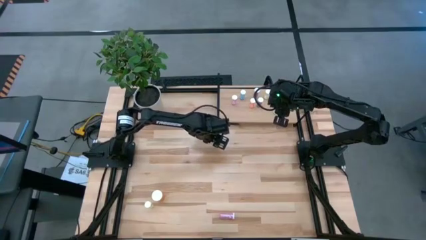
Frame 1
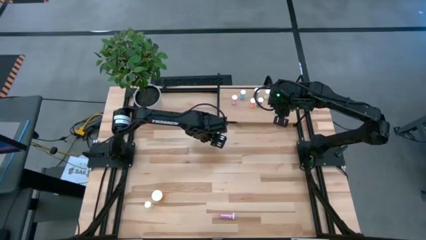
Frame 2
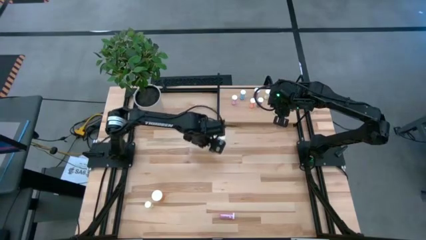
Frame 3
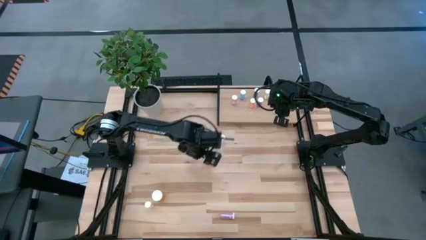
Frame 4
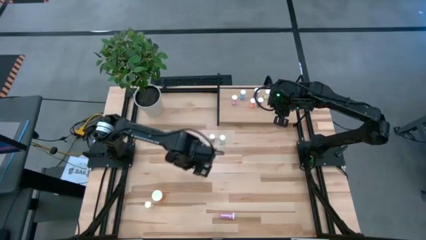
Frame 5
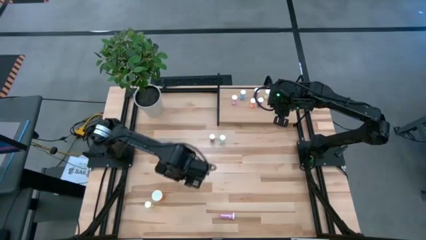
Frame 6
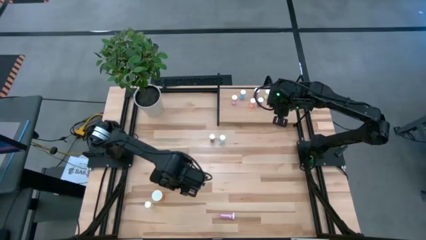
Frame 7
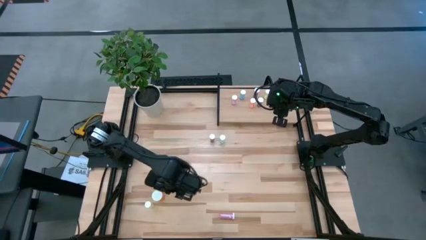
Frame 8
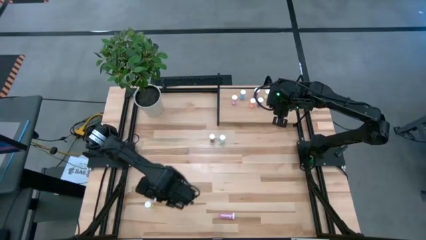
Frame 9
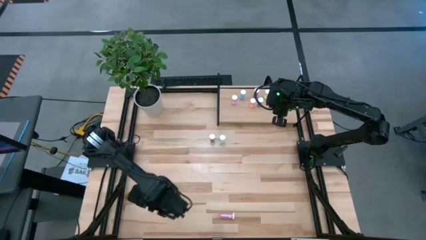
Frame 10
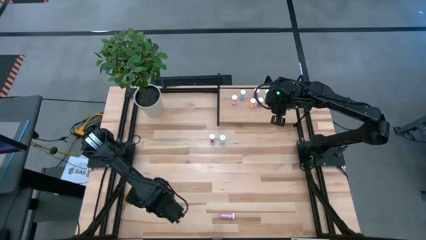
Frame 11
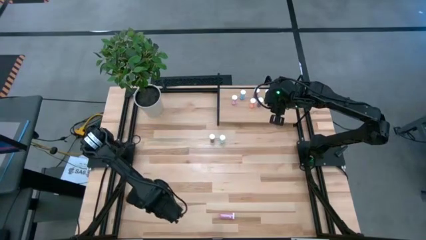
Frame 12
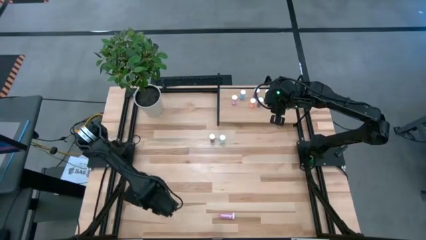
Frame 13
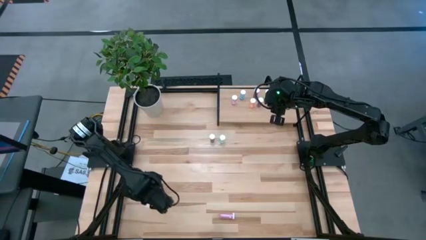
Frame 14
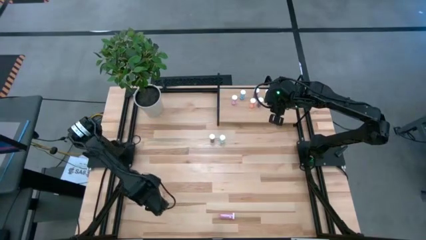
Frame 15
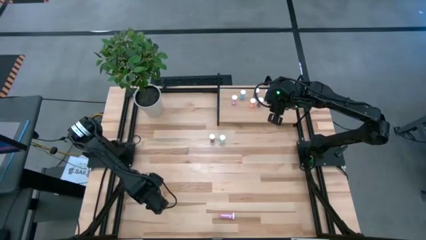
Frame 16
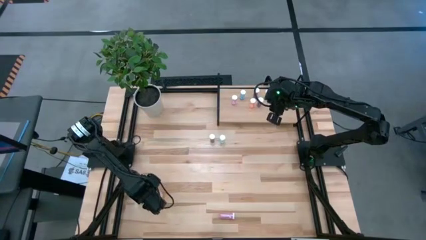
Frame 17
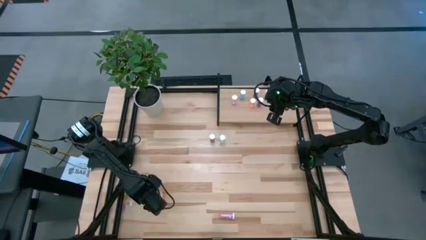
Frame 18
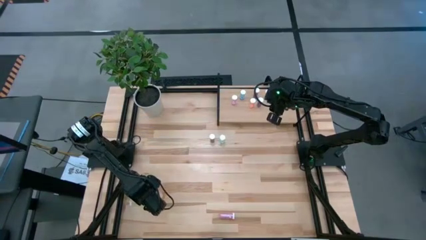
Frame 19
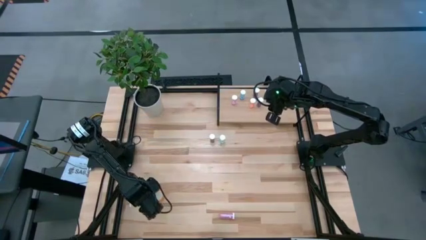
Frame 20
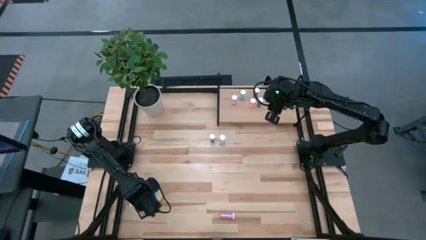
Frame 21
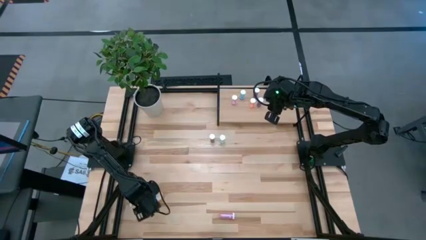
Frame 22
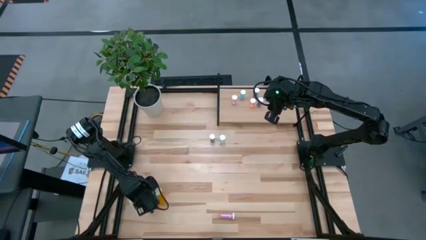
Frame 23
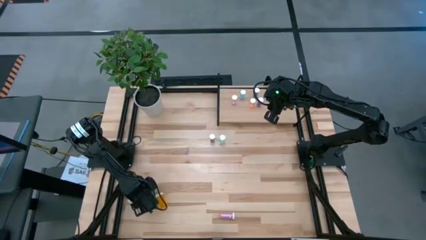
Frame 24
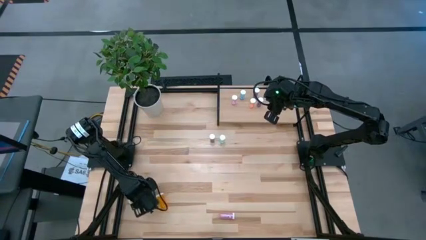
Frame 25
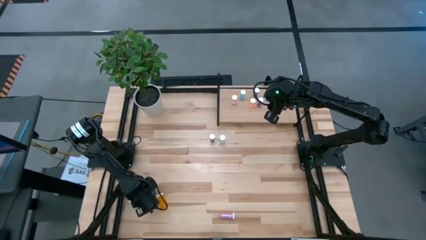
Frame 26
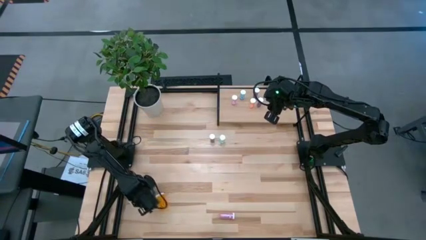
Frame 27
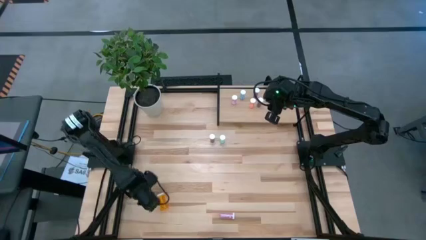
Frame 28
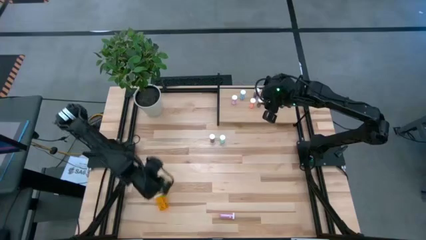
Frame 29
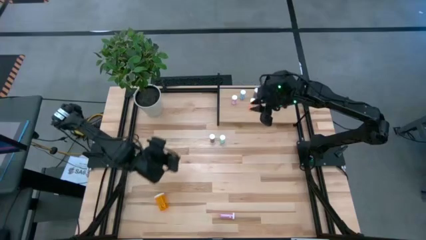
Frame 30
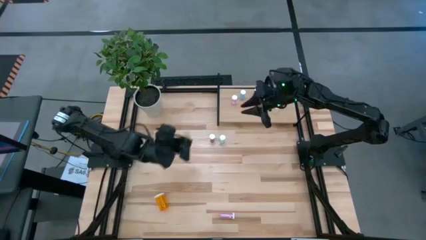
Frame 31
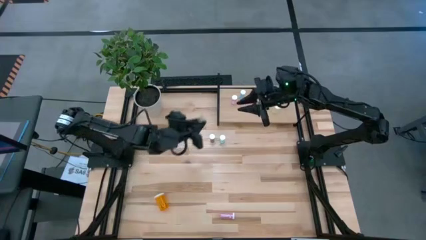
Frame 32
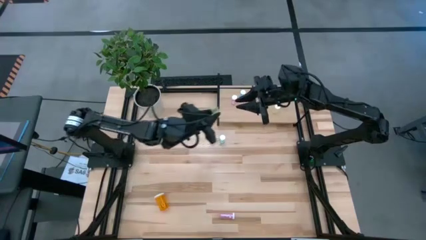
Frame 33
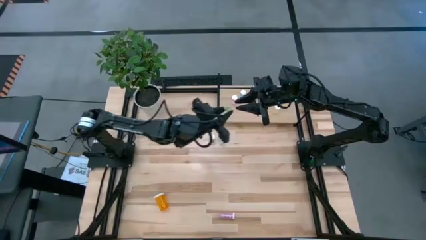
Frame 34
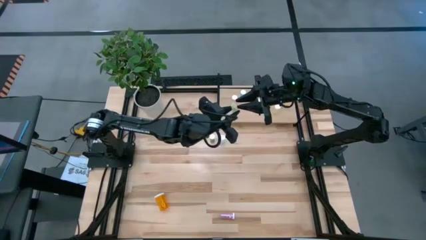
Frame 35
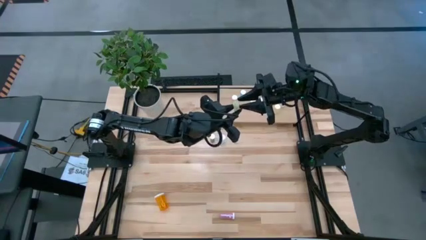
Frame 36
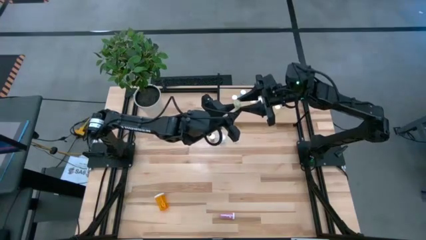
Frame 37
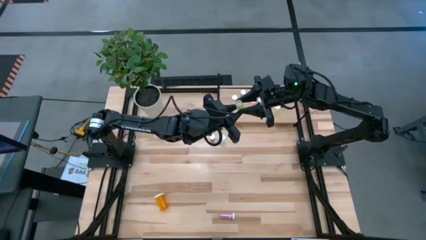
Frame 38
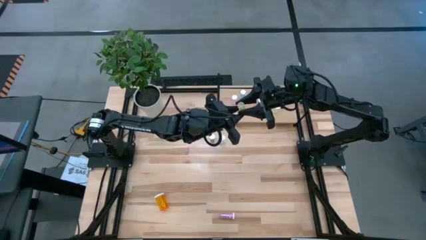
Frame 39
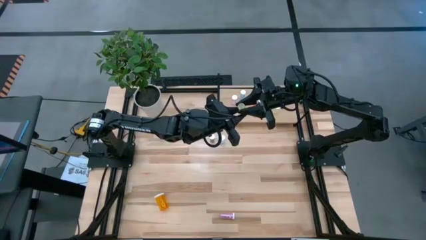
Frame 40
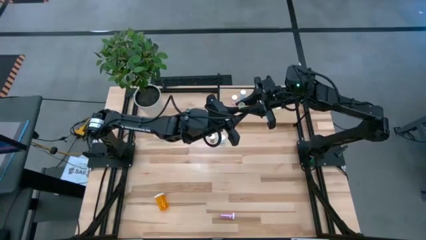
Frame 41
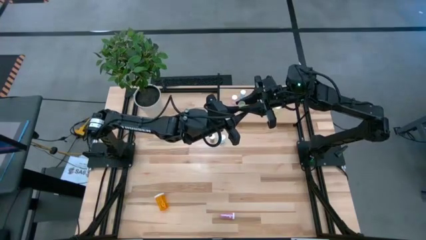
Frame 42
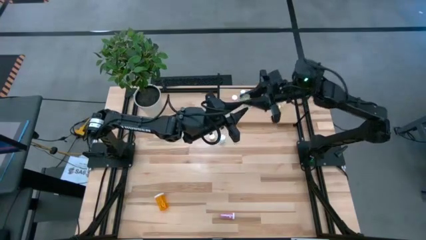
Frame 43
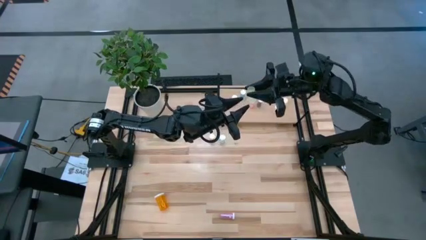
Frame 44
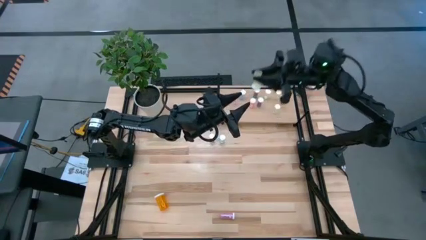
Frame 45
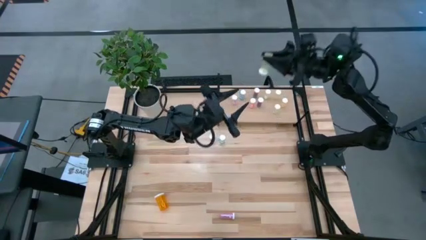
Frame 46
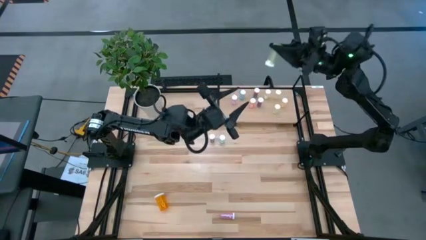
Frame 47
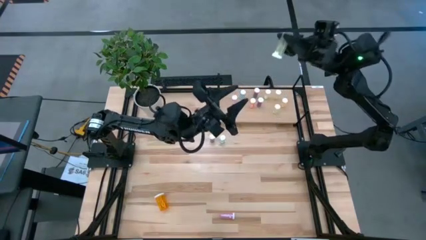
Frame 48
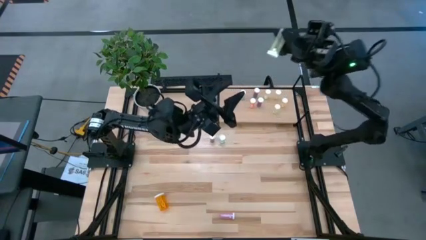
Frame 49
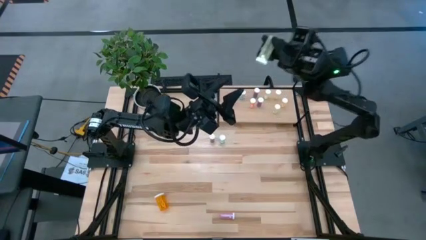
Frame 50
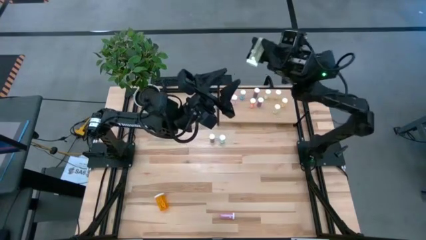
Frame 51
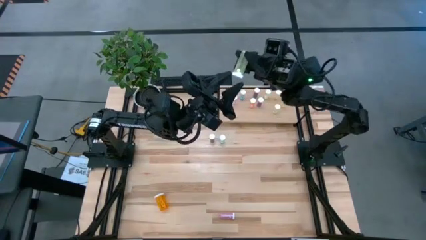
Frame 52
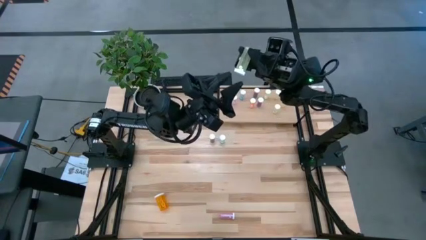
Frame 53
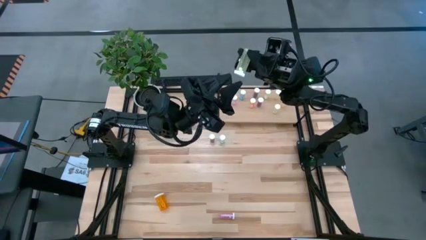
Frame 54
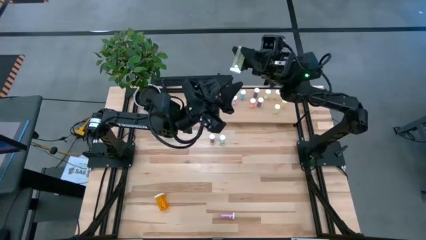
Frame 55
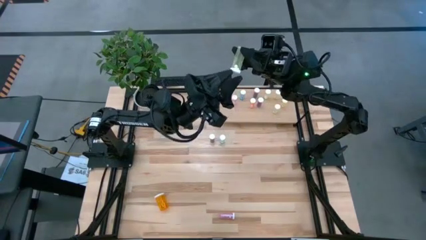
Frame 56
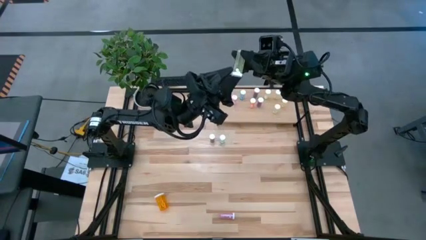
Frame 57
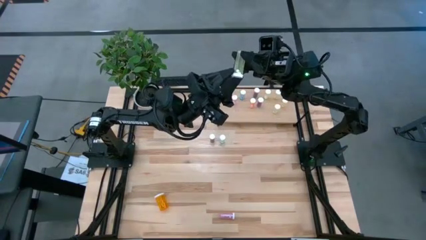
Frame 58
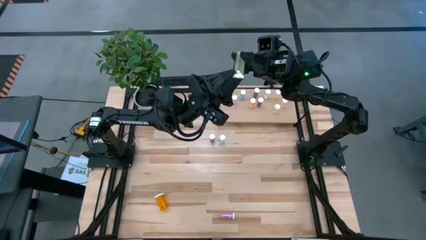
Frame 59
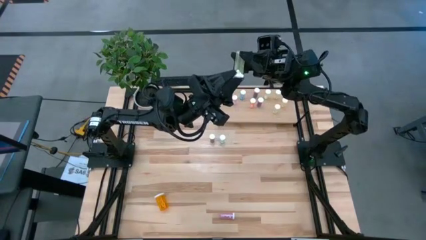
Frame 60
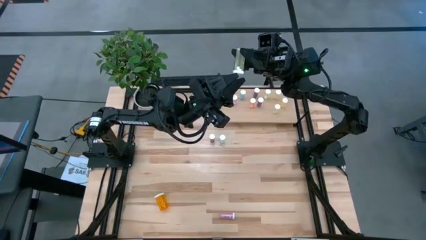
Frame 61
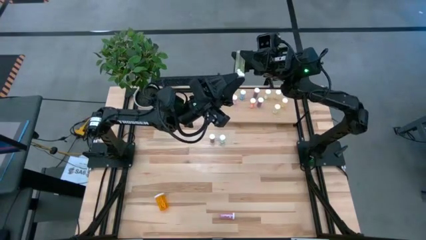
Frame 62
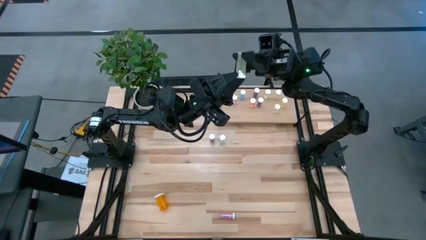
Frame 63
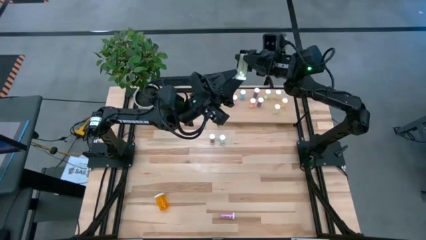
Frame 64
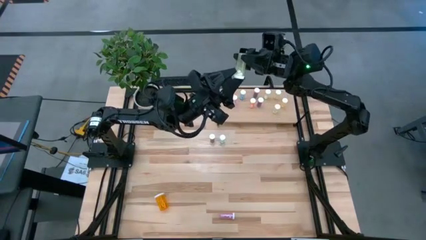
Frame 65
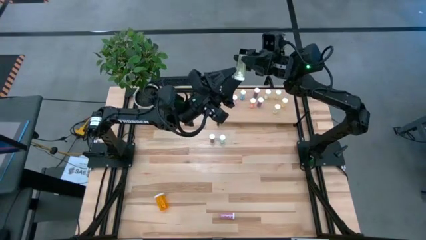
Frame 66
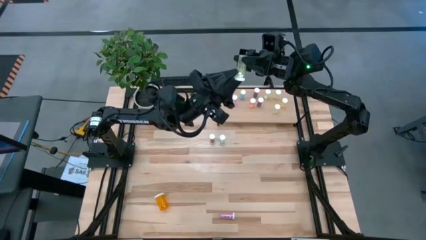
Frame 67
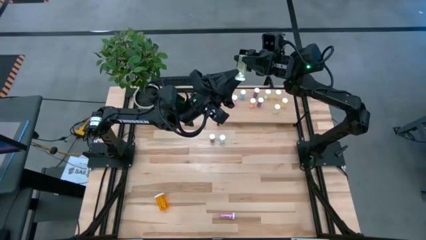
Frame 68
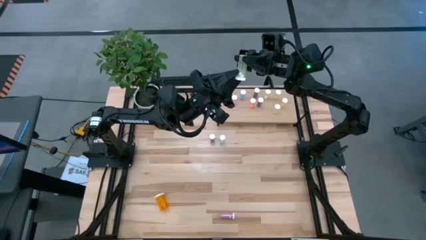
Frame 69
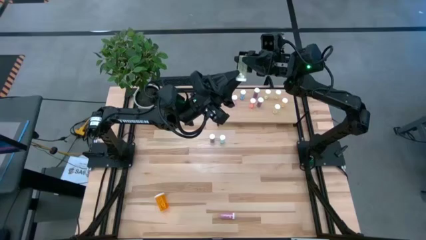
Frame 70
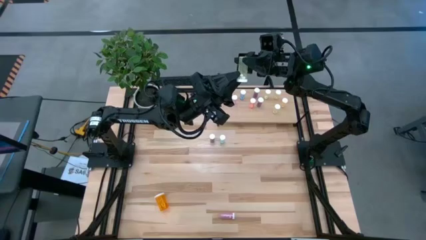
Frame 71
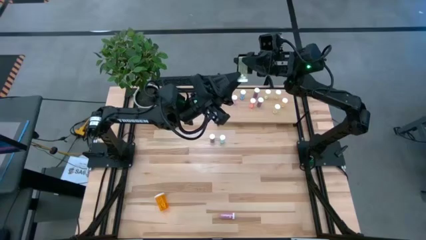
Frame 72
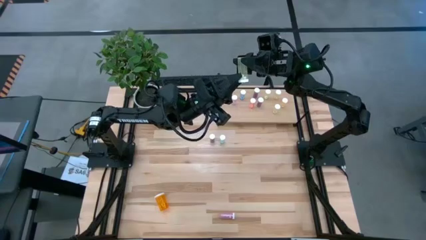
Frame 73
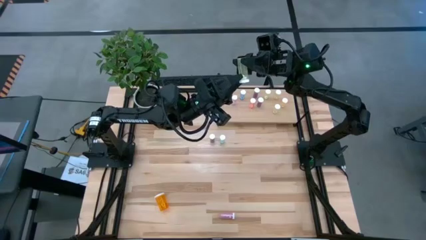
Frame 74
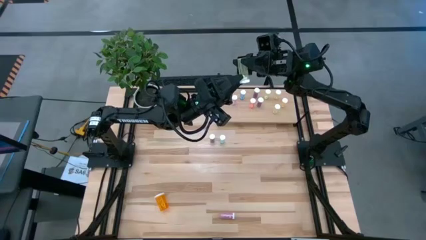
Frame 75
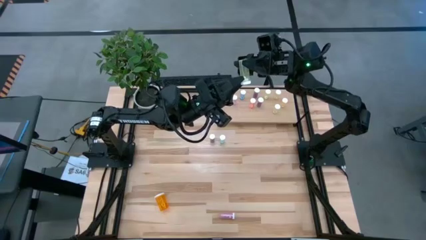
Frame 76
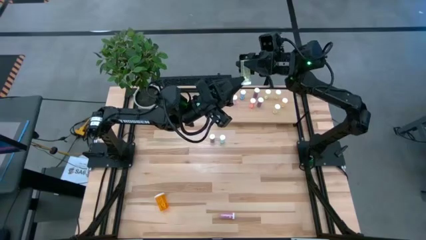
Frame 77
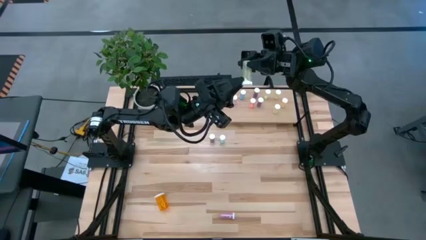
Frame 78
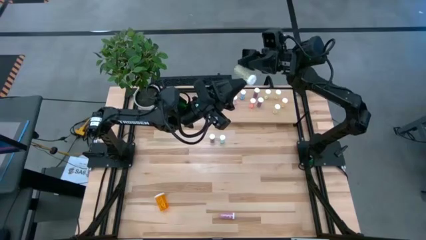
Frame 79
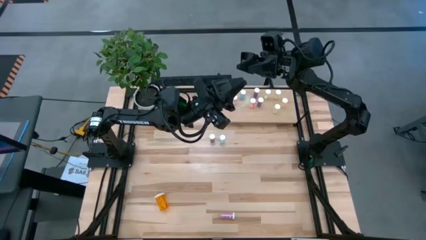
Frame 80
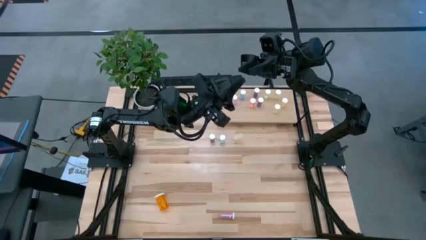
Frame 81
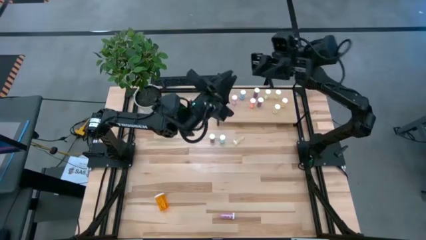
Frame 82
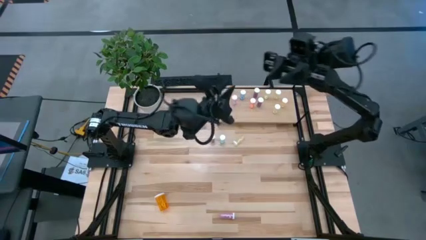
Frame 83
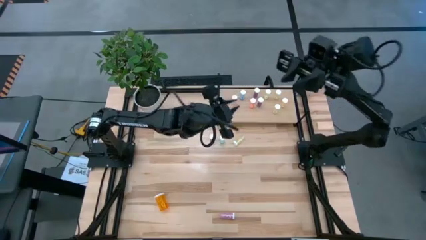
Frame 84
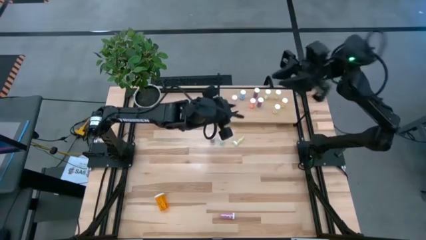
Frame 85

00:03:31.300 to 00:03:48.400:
Task: Pick and place medicine bottles onto shelf by color
Move the yellow pill bottle to the center of the table
